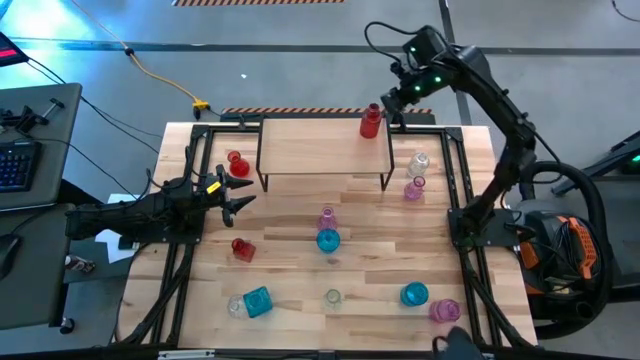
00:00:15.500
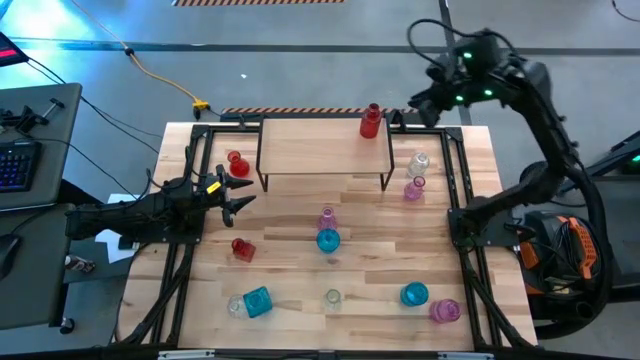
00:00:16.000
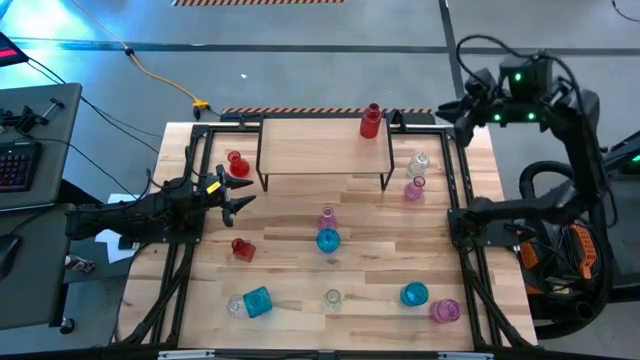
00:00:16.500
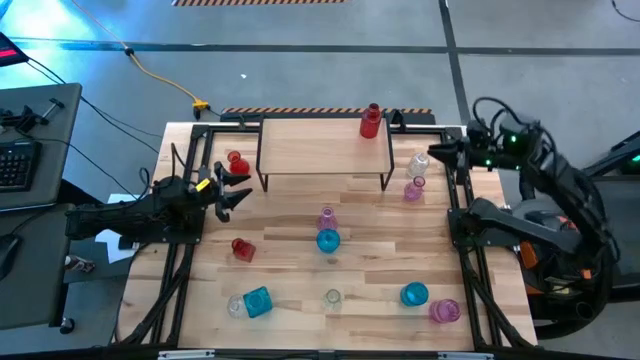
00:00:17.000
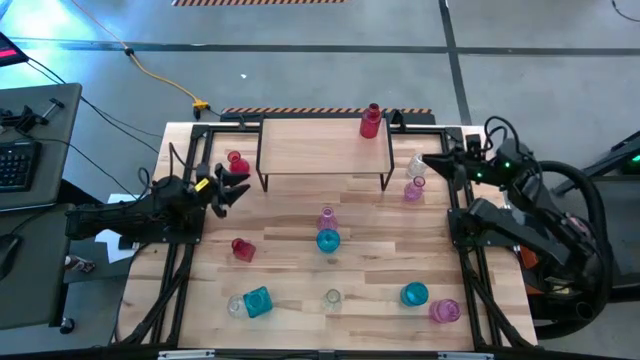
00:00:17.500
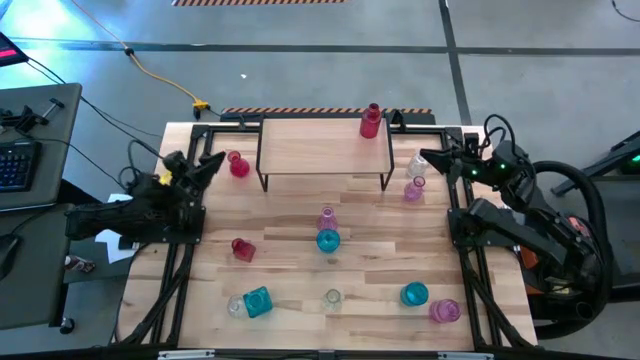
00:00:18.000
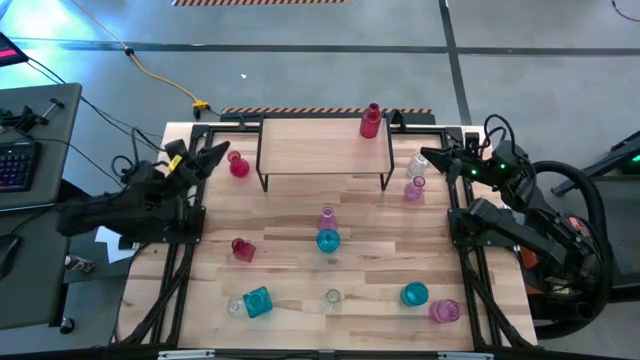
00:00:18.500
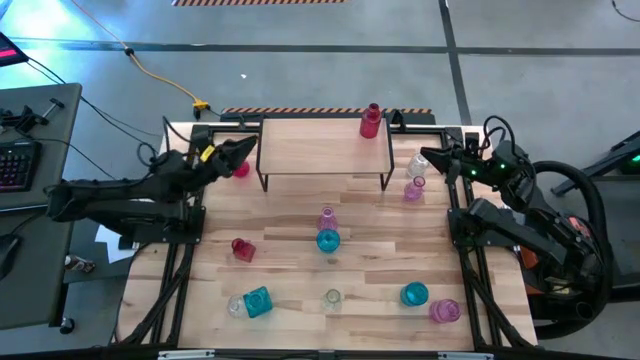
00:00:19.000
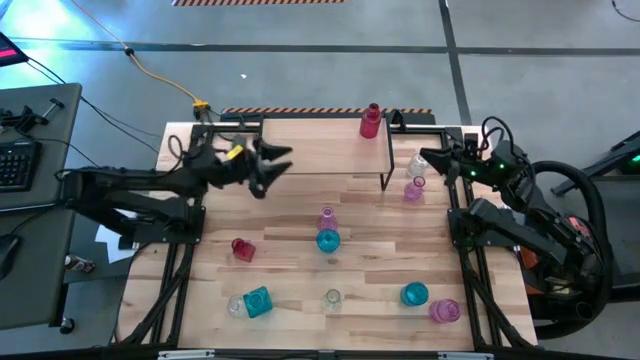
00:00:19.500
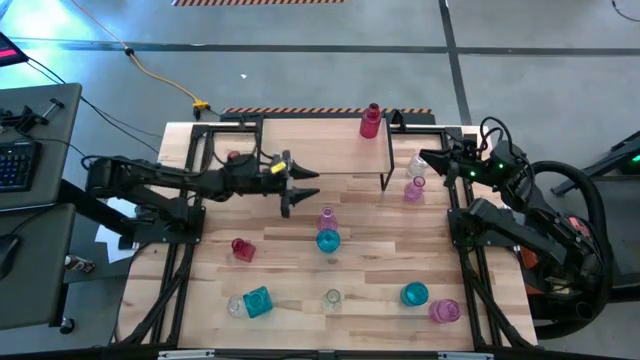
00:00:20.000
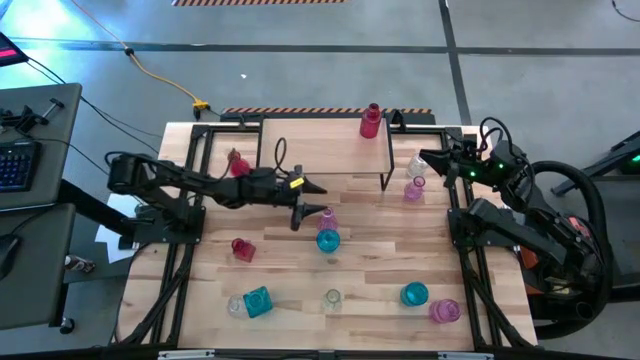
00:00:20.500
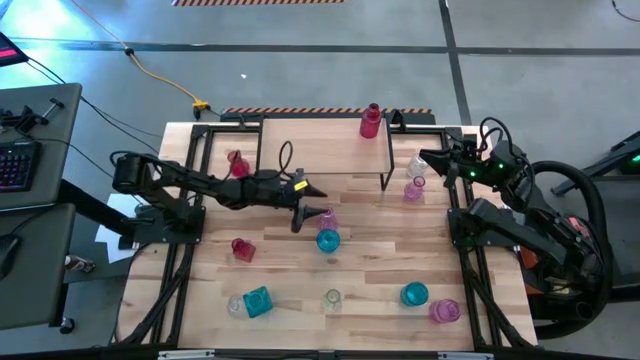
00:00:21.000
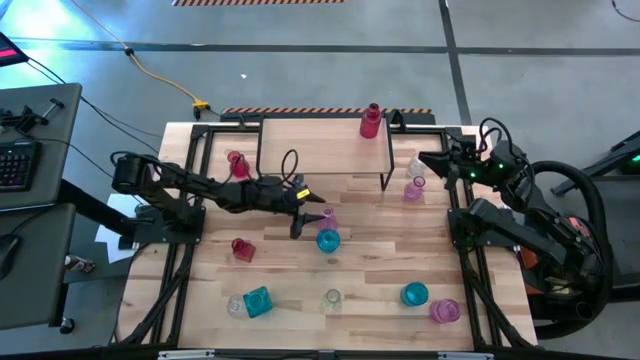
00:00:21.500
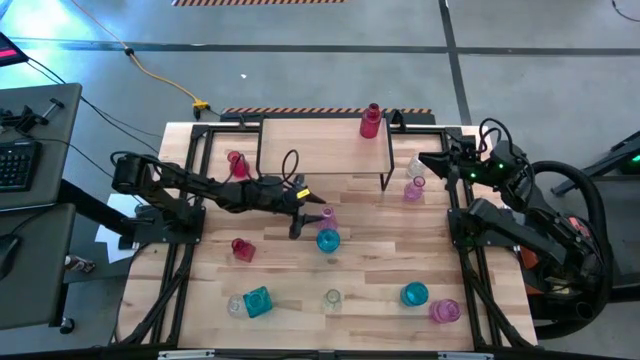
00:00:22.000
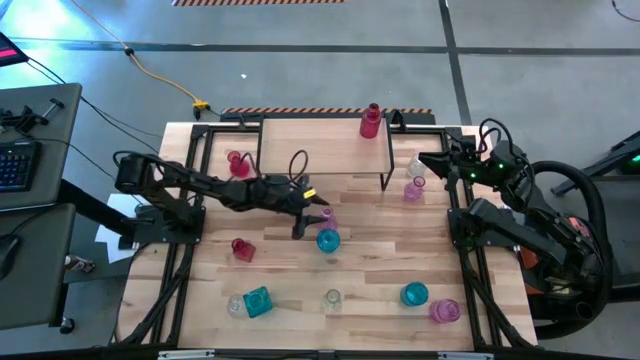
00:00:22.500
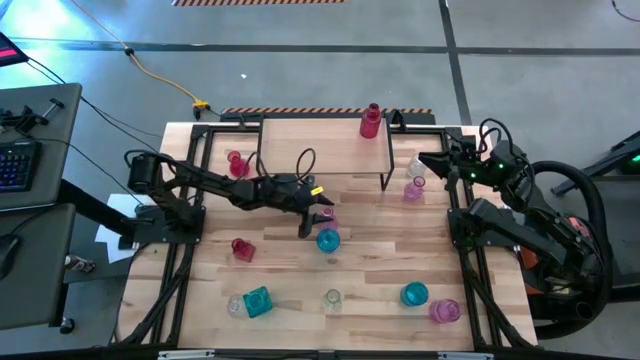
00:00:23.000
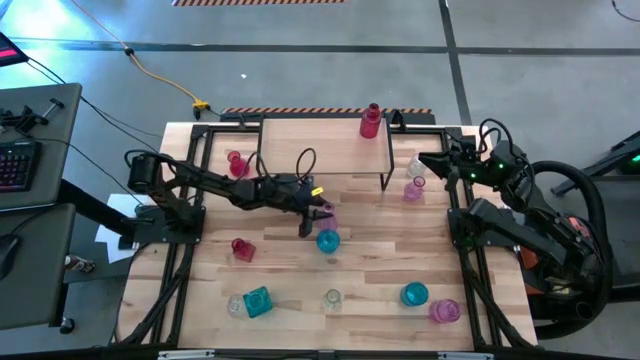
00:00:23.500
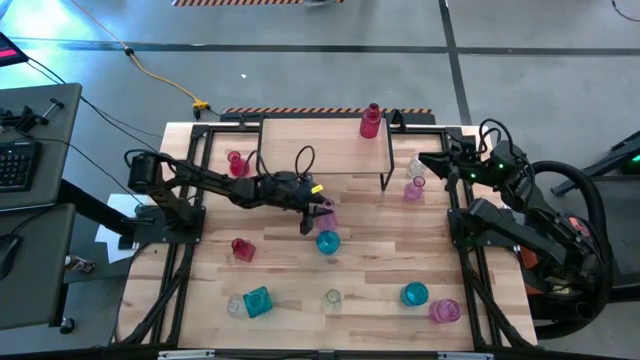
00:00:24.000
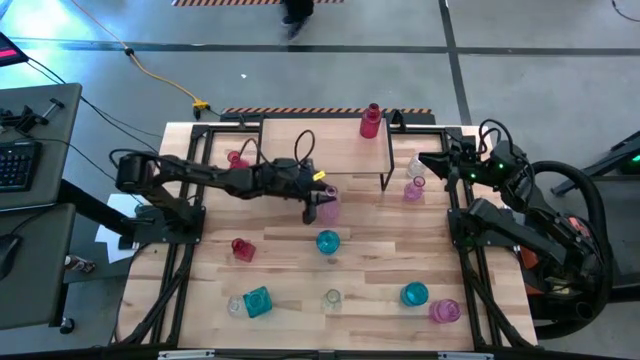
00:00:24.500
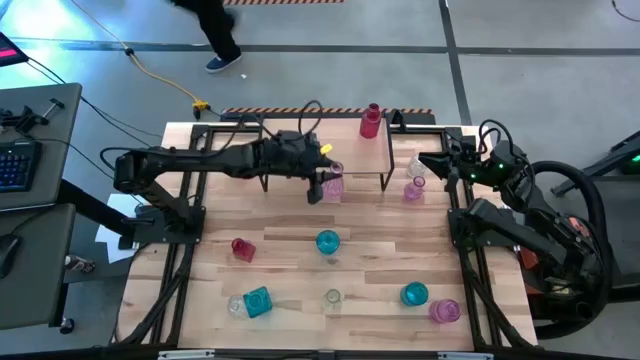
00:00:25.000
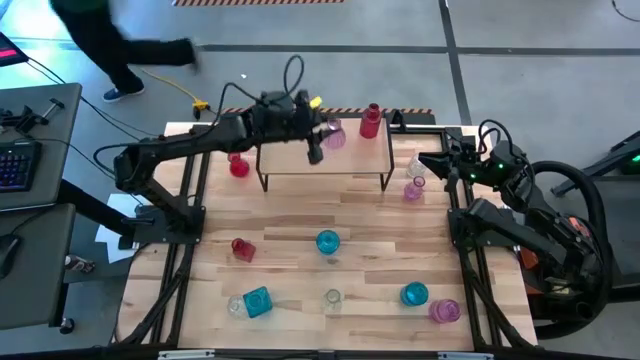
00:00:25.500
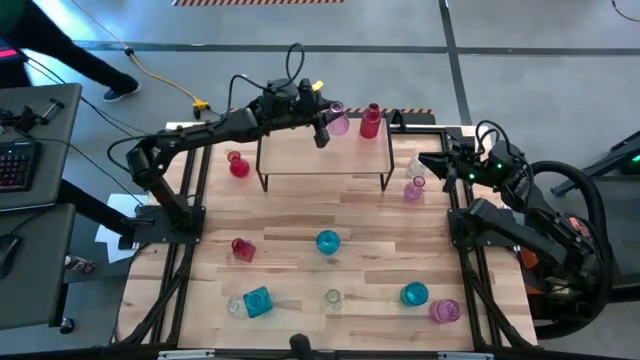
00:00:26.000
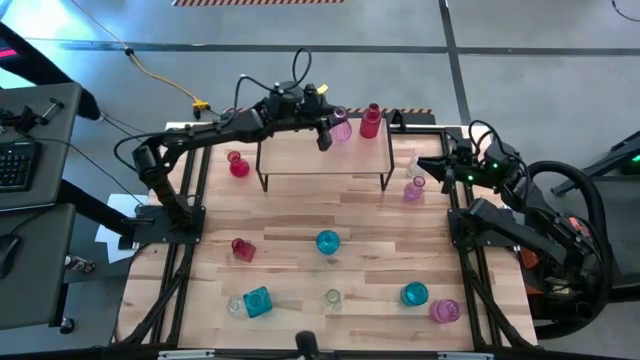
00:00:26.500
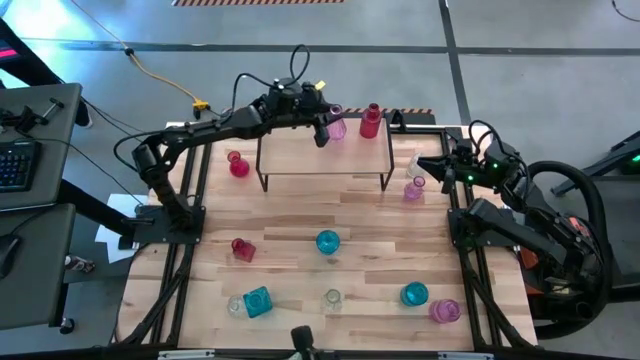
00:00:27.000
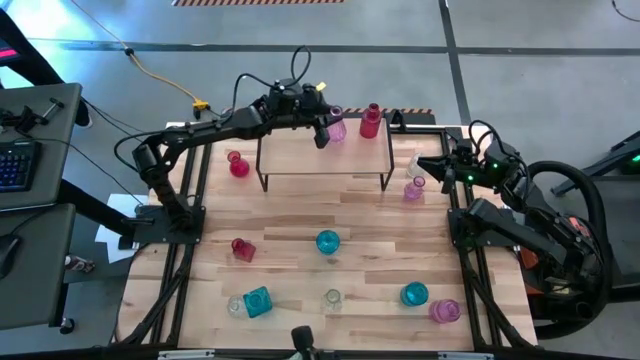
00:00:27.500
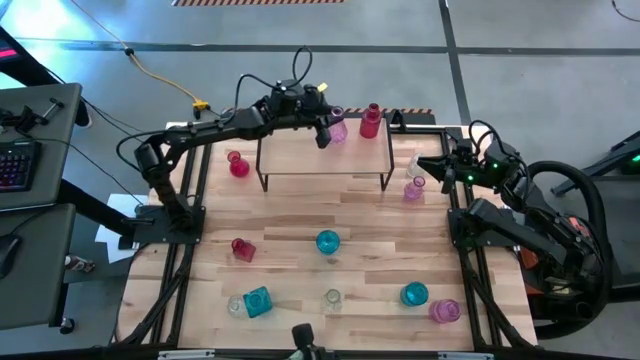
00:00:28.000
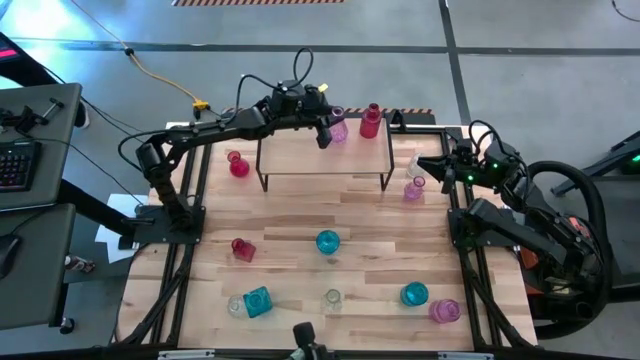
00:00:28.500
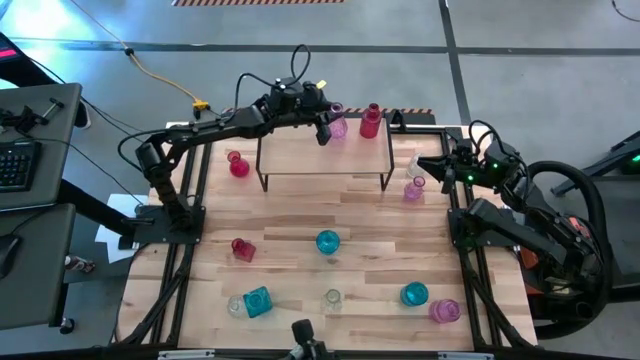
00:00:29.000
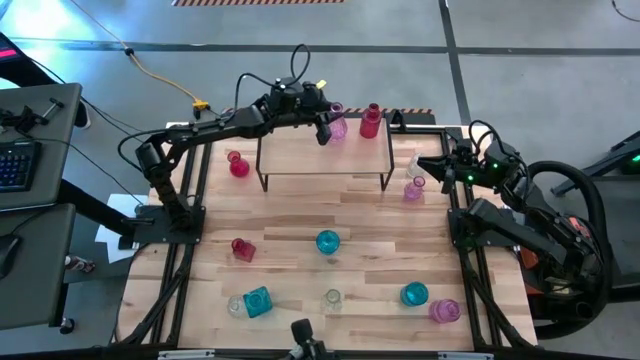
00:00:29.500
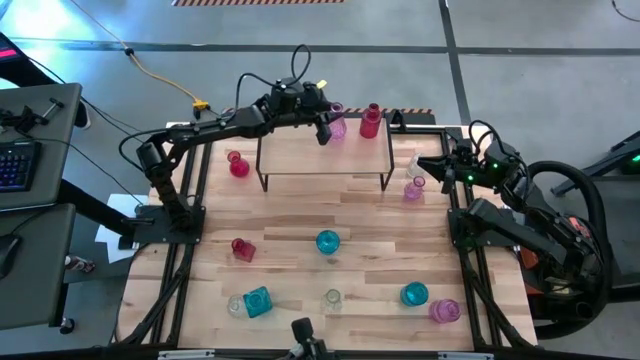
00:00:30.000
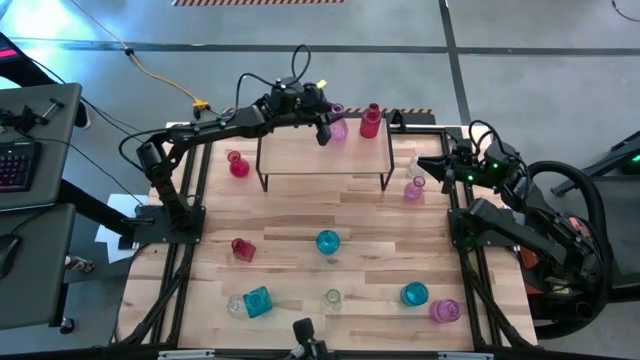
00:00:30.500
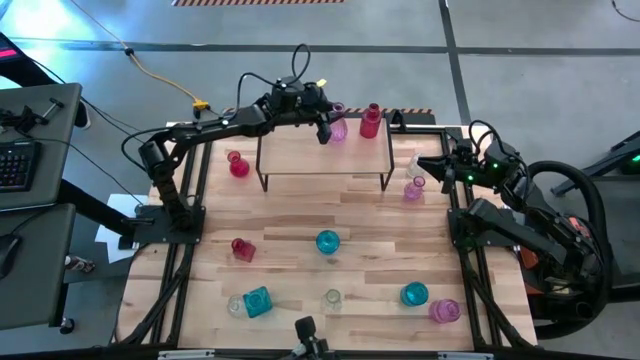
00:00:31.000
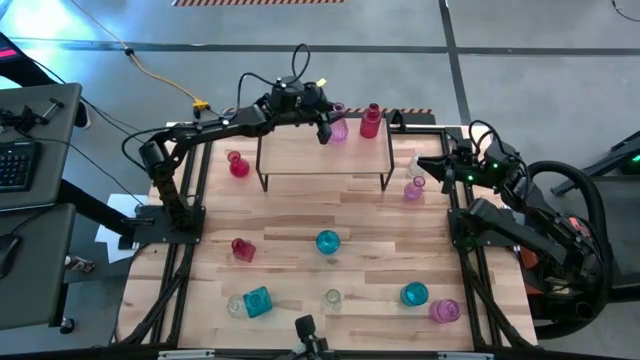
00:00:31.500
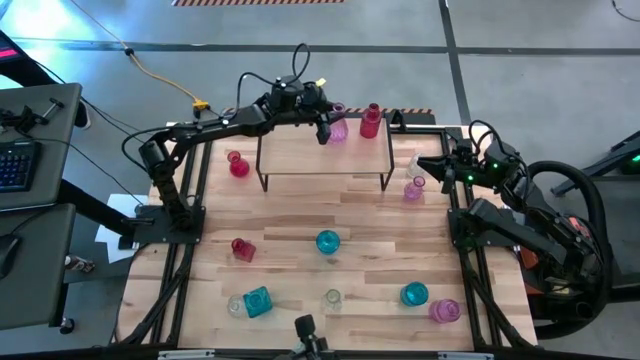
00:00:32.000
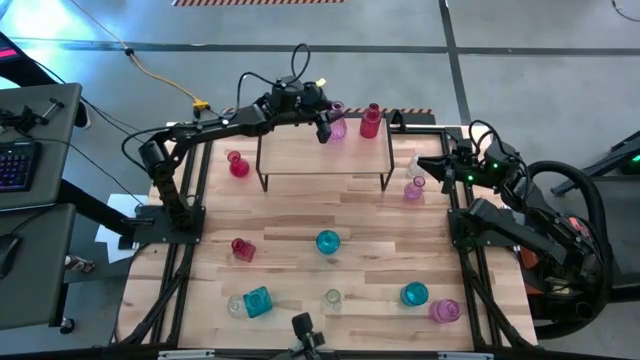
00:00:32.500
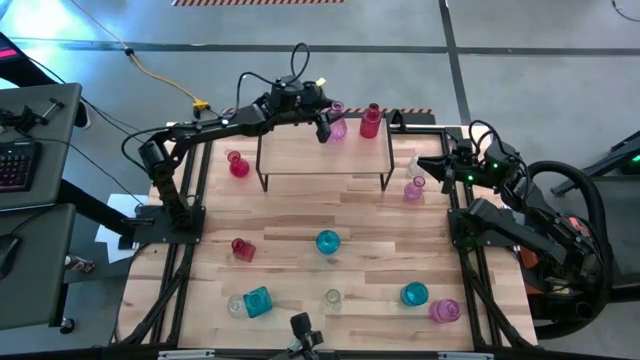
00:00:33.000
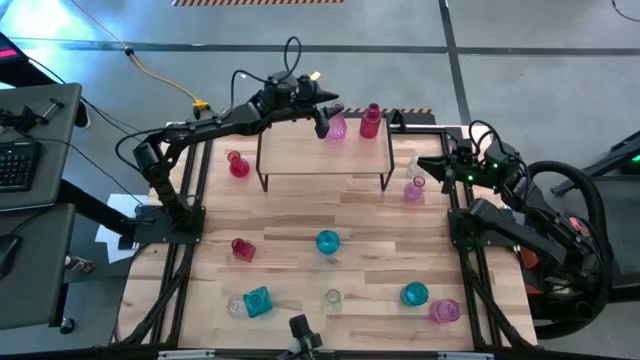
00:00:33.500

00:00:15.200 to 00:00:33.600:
Task: sort vases onto shelf
Put the middle left purple flower vase on the shelf
